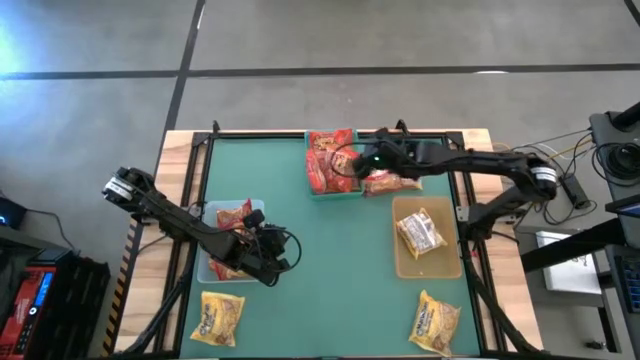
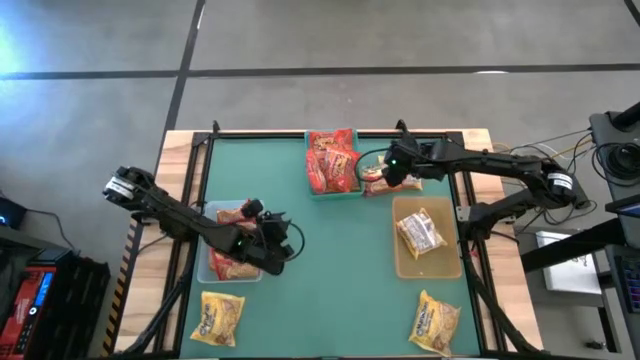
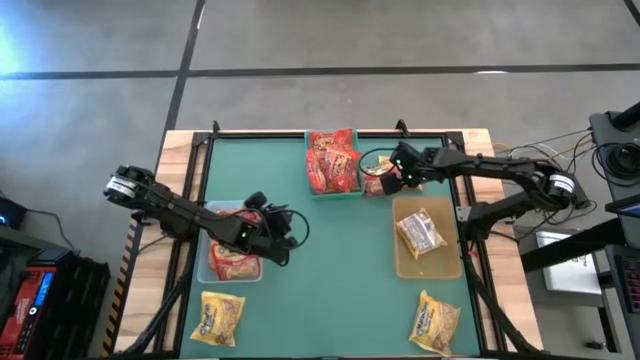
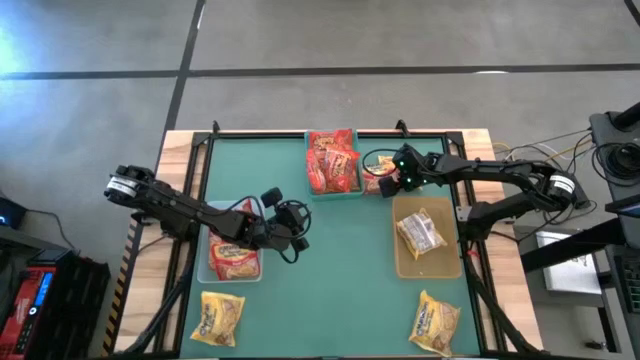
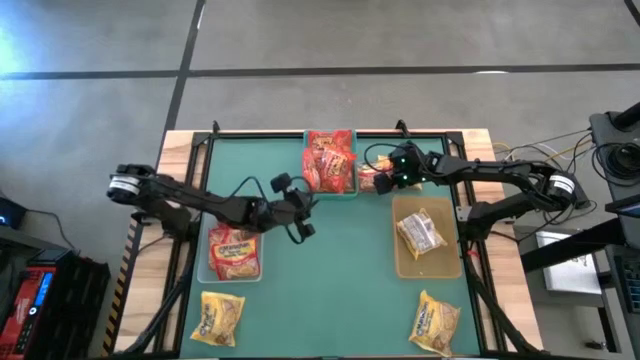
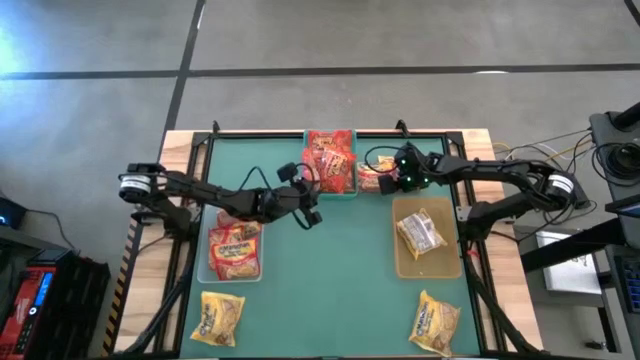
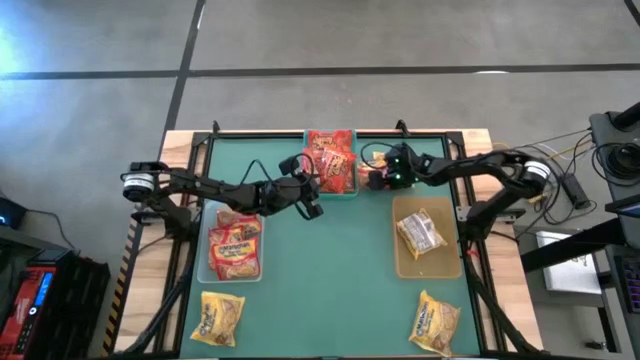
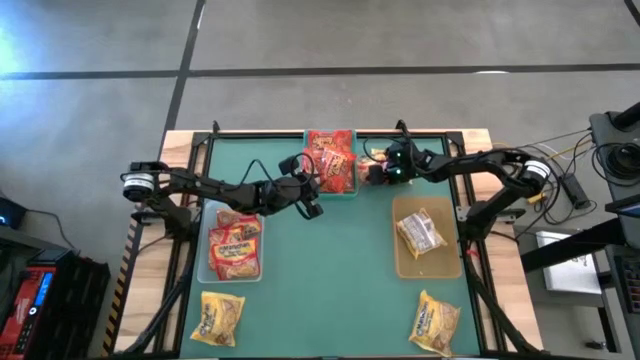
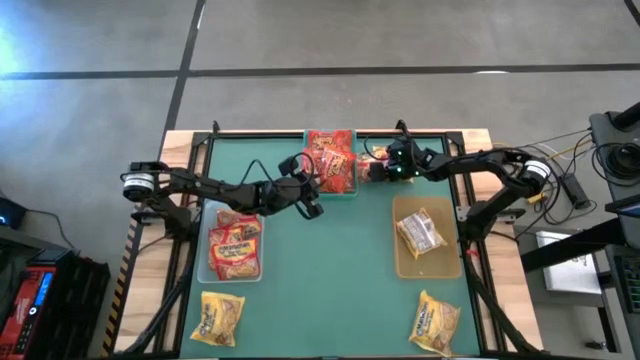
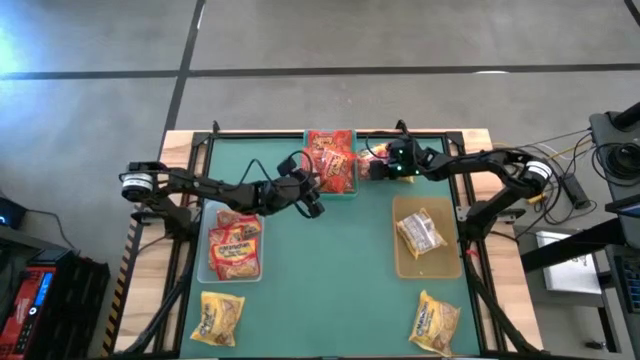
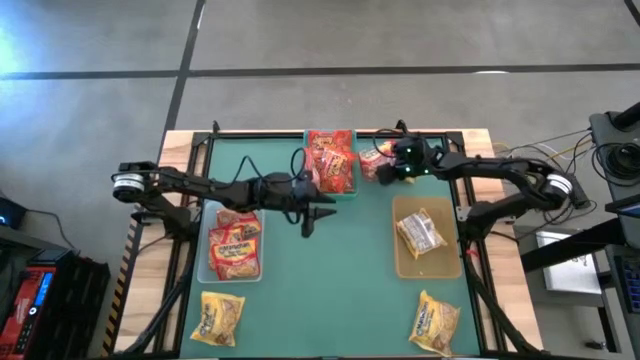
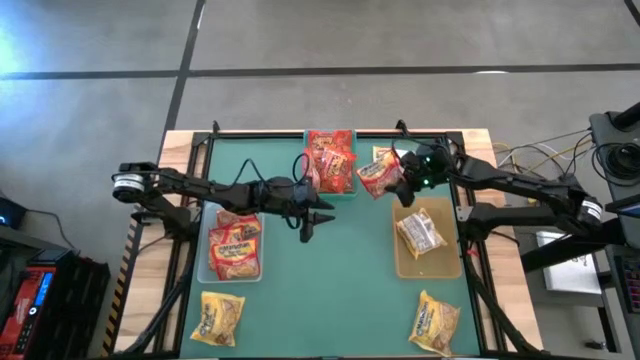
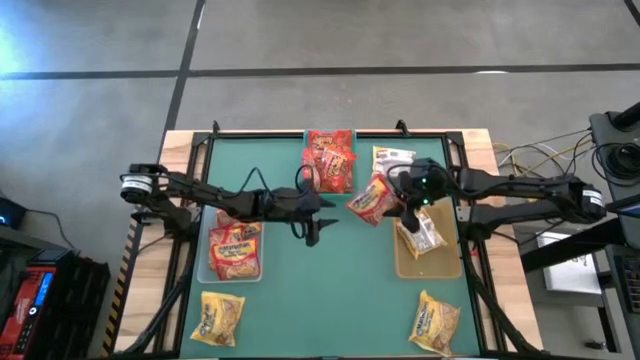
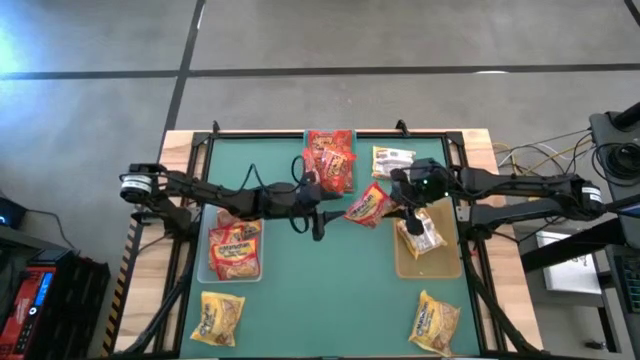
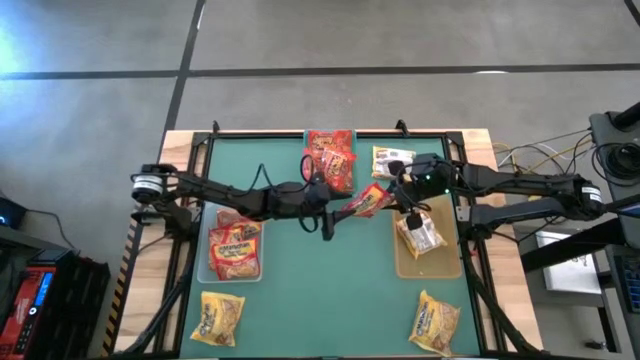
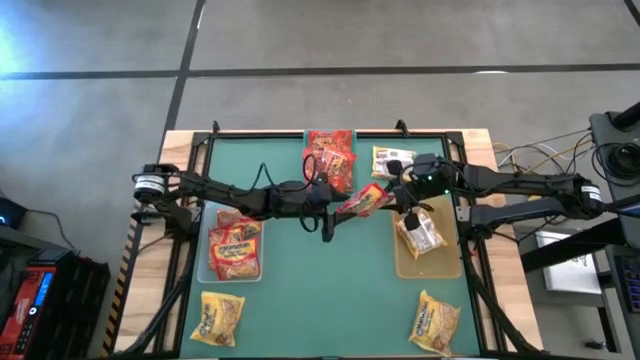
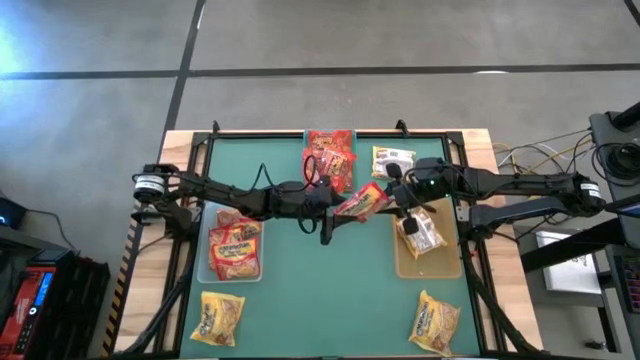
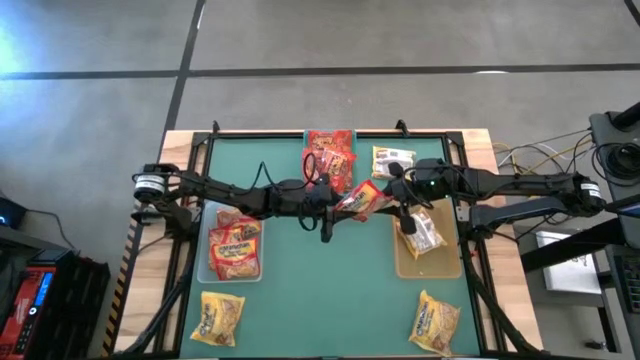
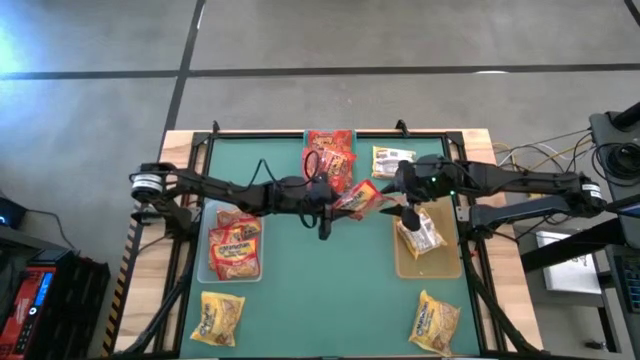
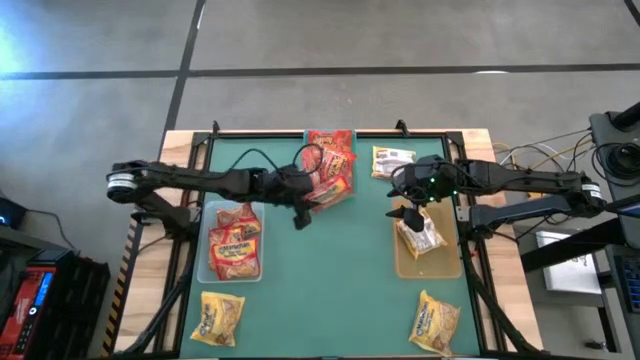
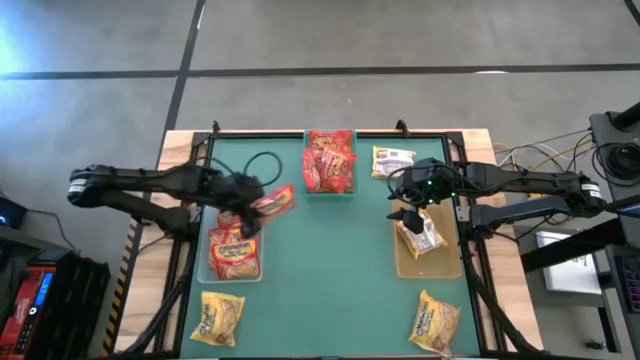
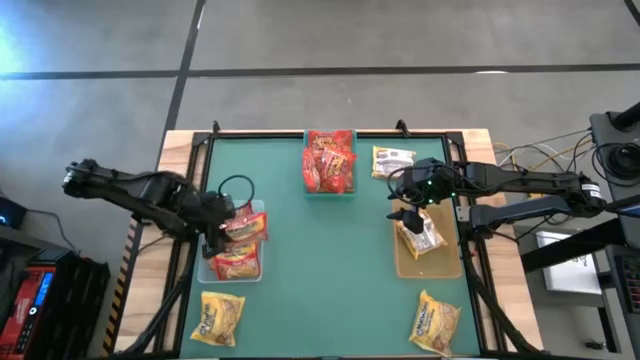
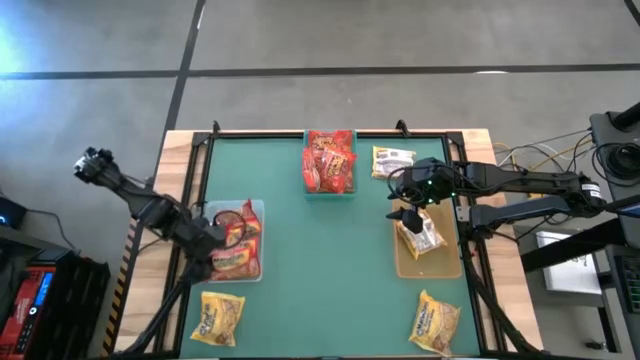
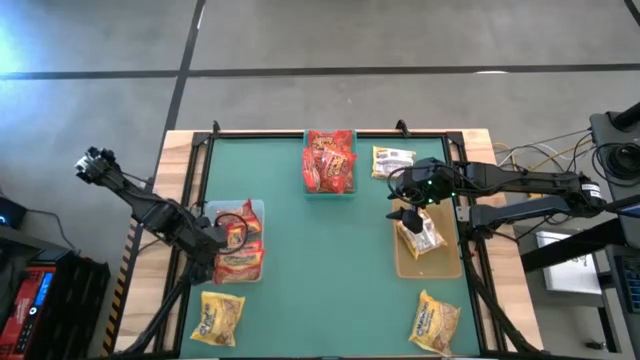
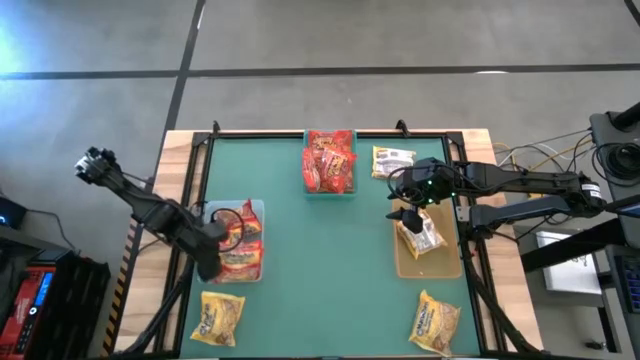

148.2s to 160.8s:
Task: Sort Maruchan noodles
Put red noodle pack into the white transparent bin

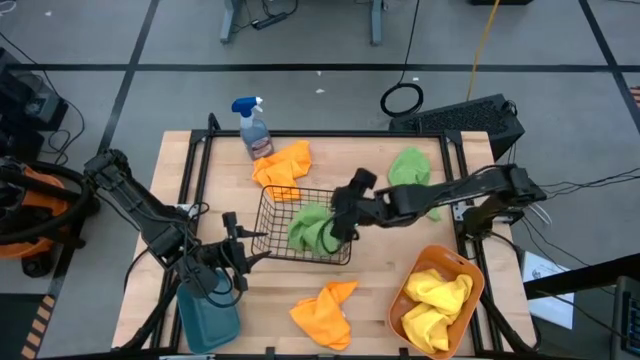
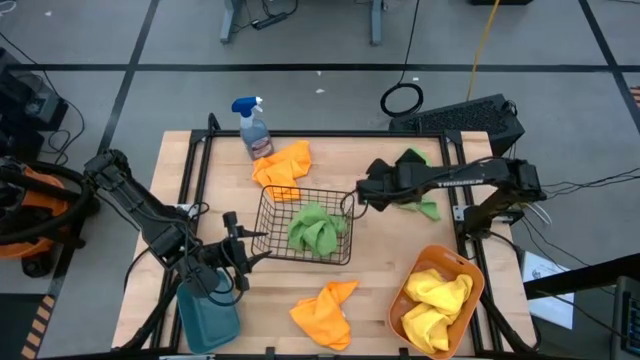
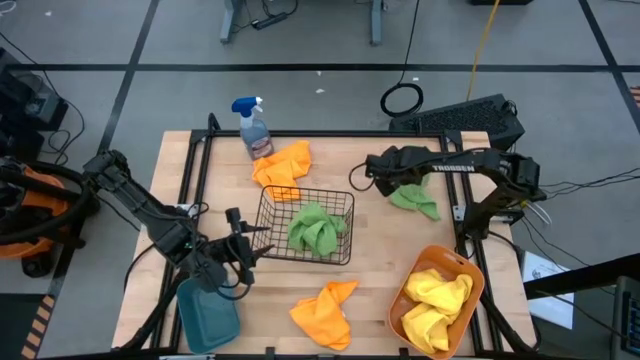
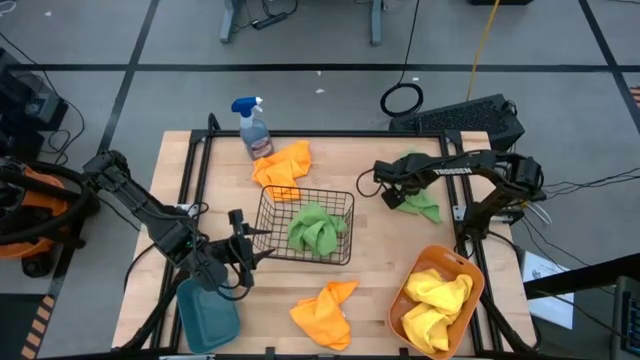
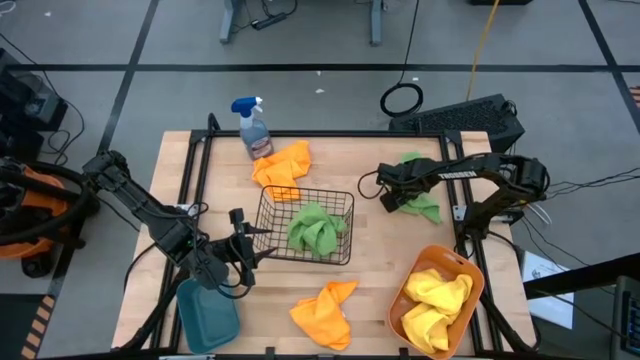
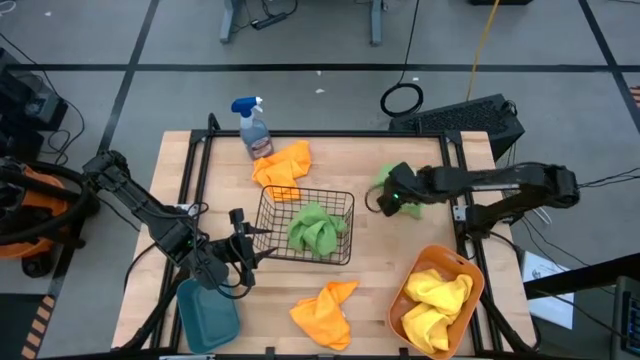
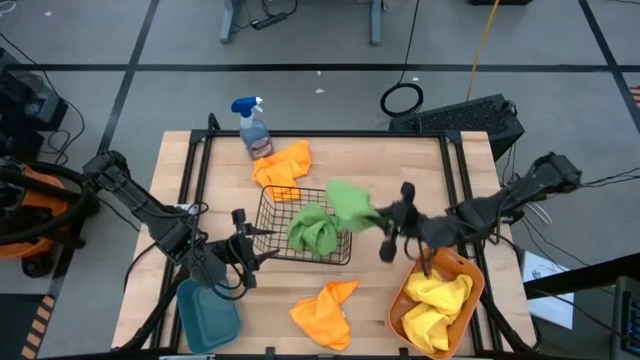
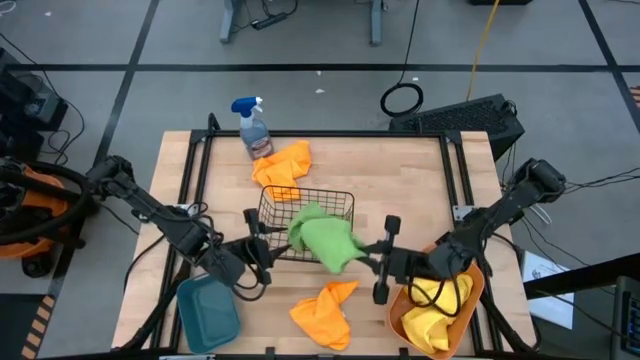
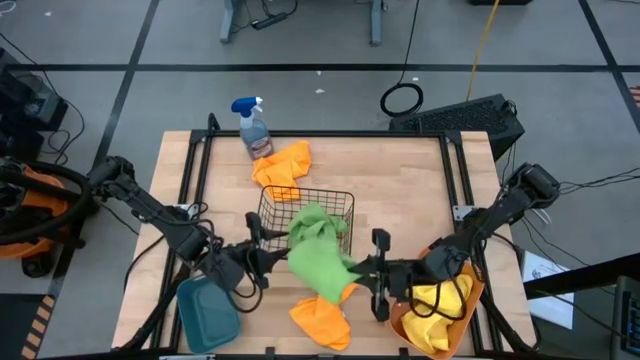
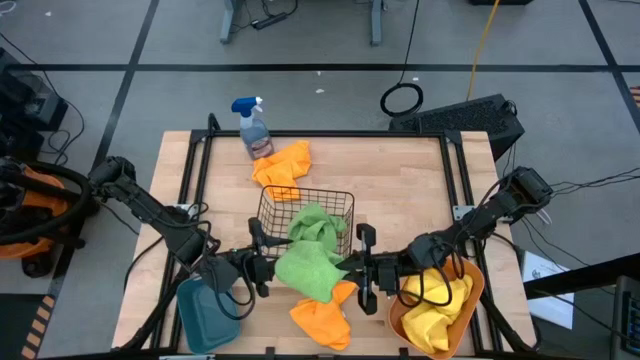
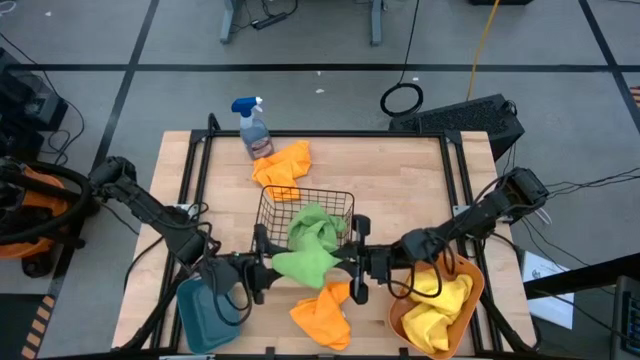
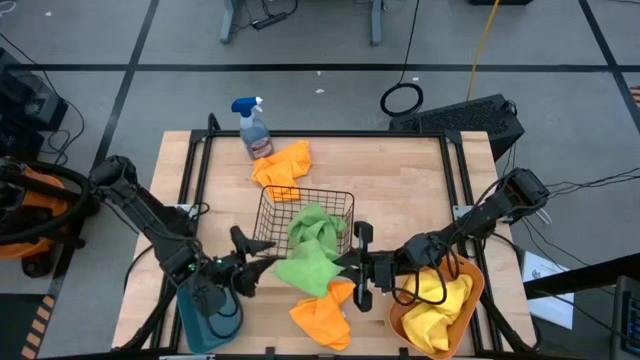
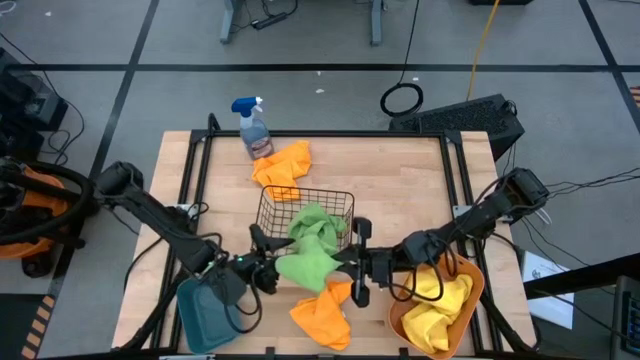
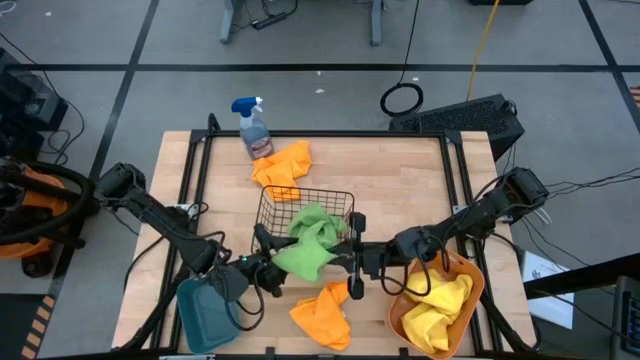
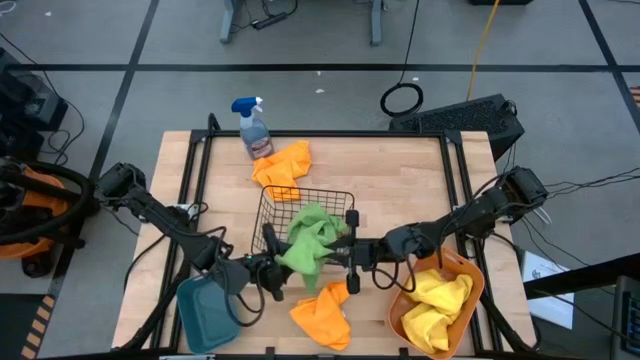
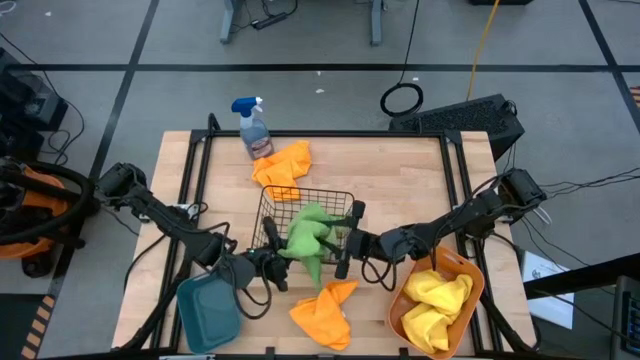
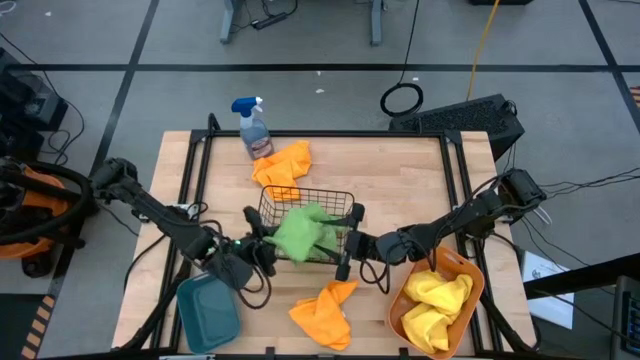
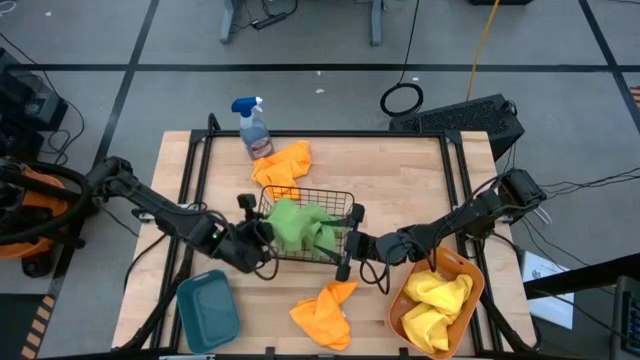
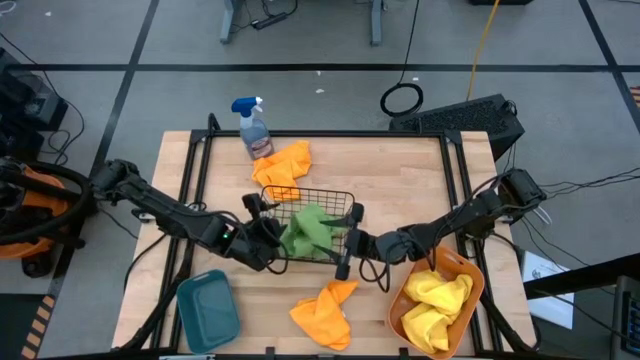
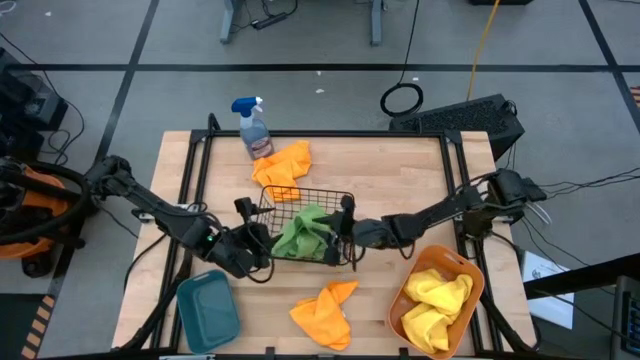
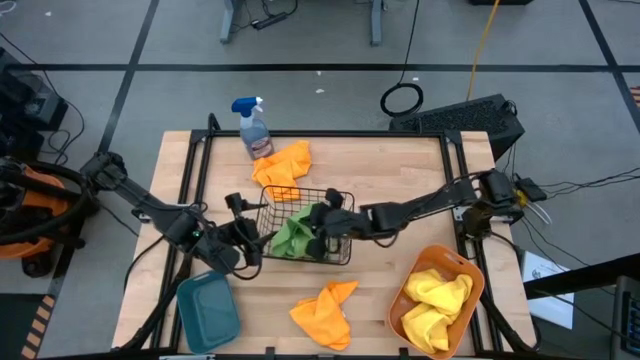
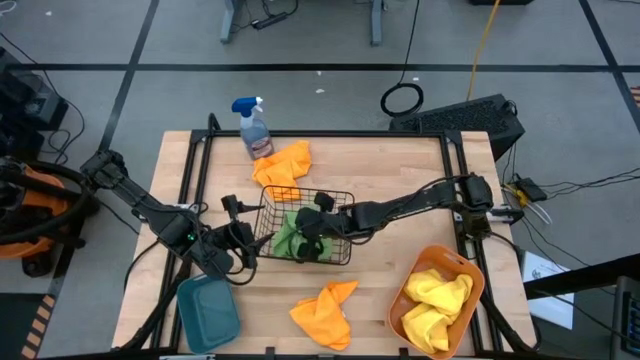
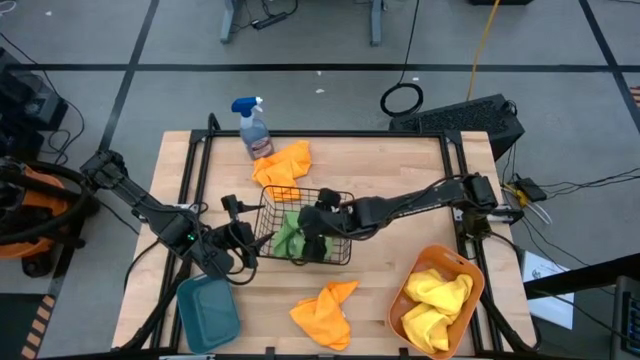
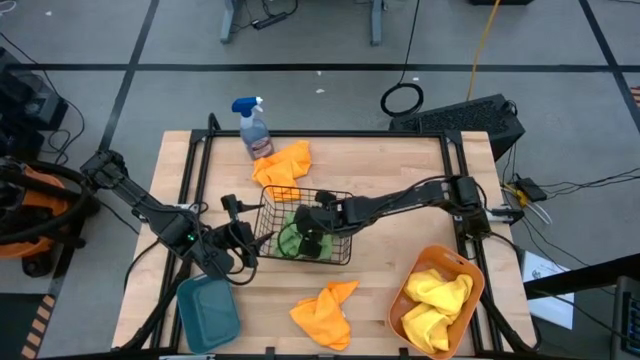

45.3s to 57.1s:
Task: Sort microfiber towel by color & place in baskets
Put the green microfiber cloth into the black wire basket
